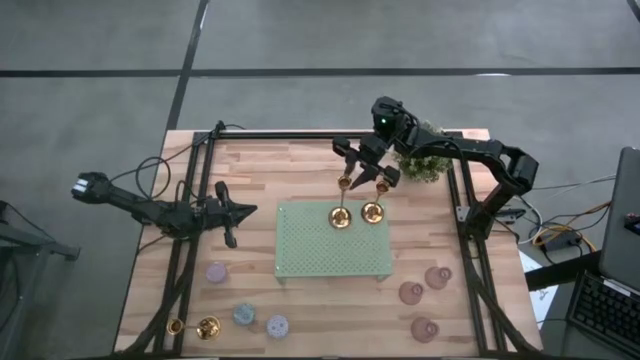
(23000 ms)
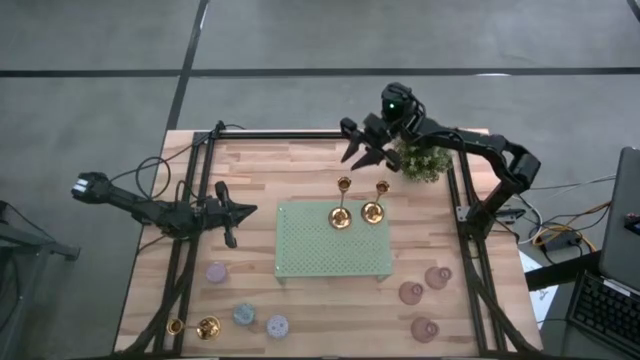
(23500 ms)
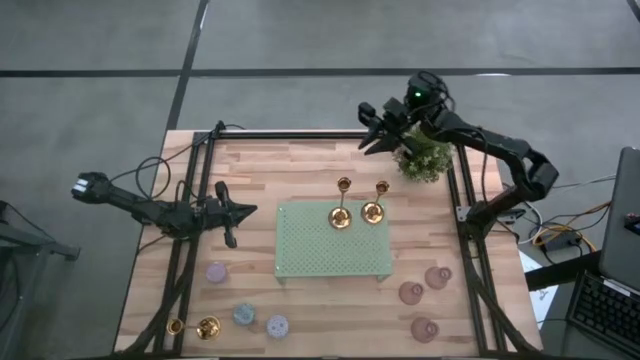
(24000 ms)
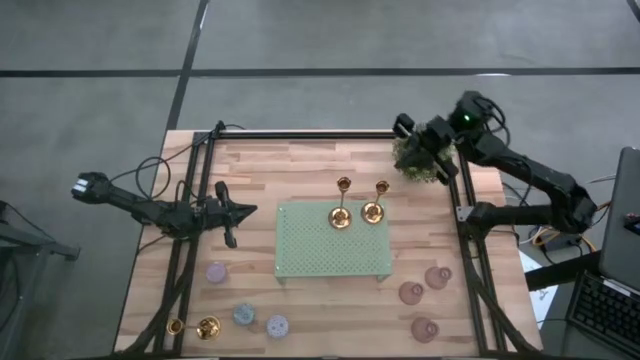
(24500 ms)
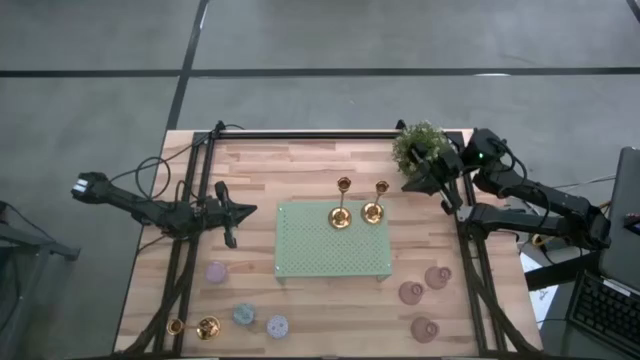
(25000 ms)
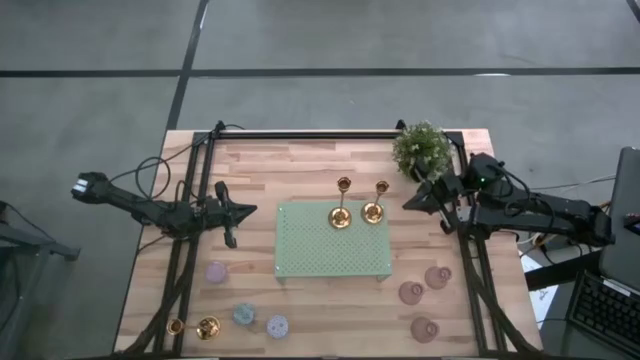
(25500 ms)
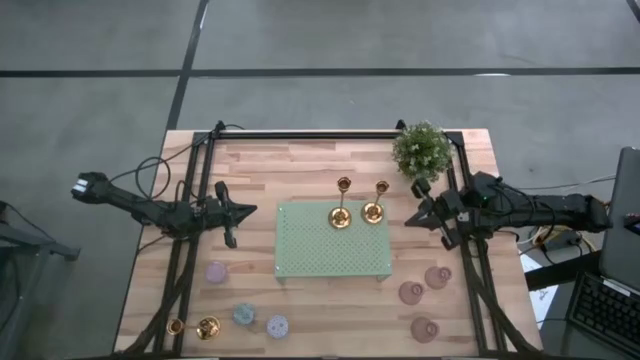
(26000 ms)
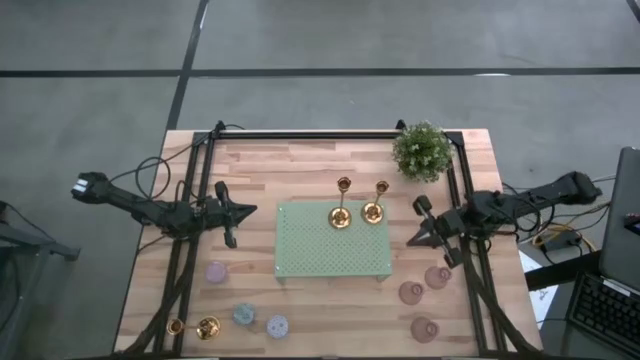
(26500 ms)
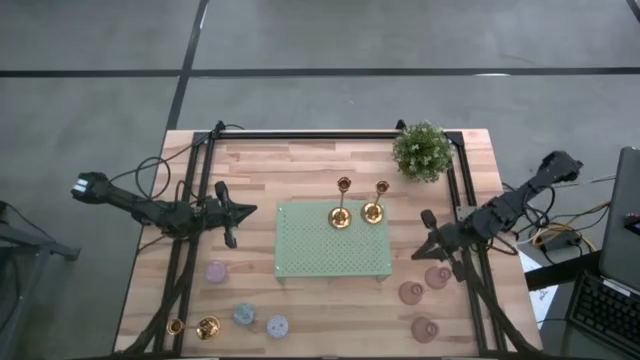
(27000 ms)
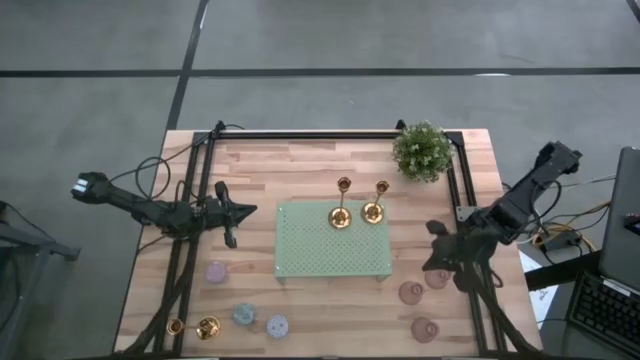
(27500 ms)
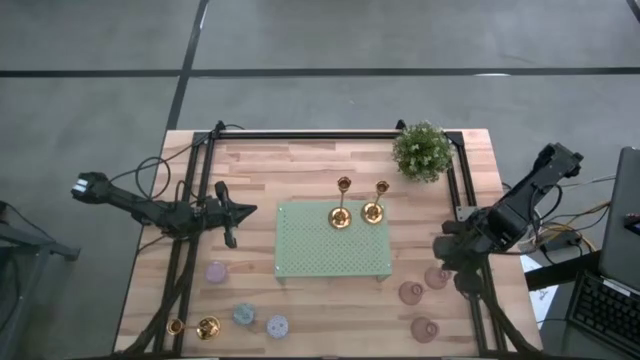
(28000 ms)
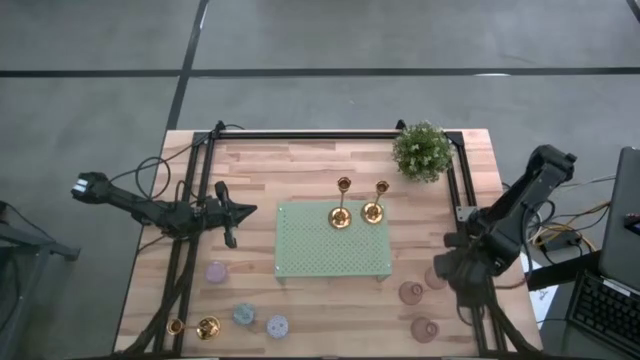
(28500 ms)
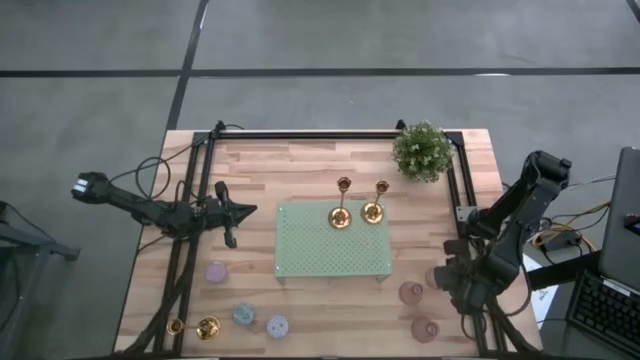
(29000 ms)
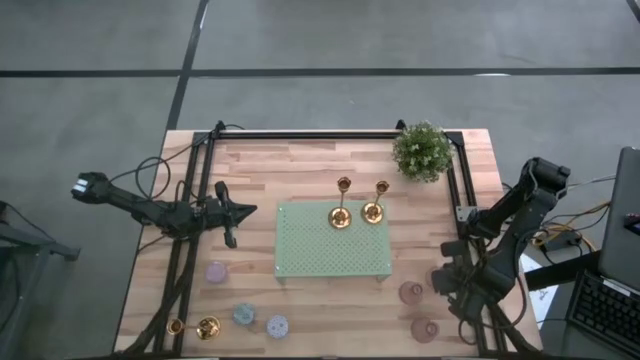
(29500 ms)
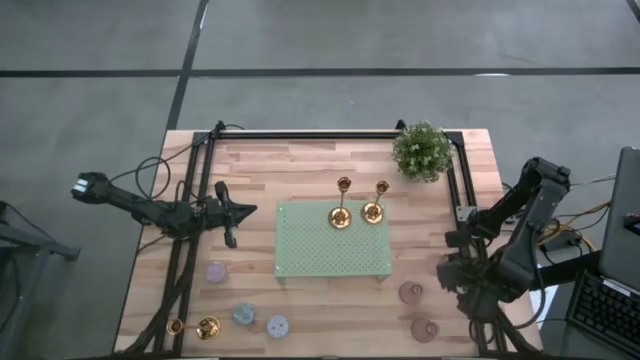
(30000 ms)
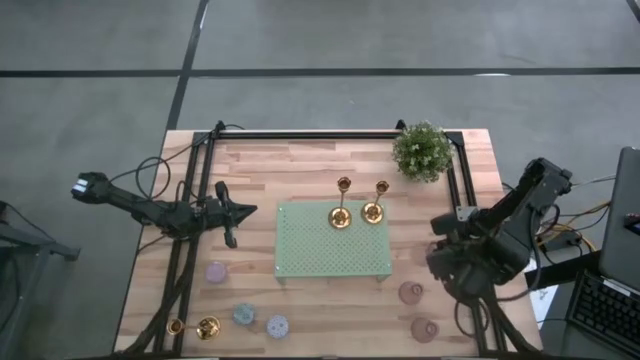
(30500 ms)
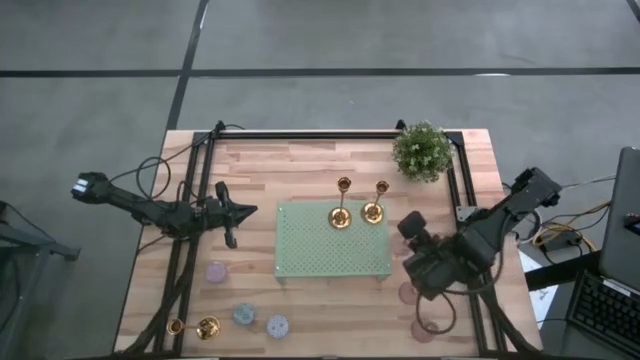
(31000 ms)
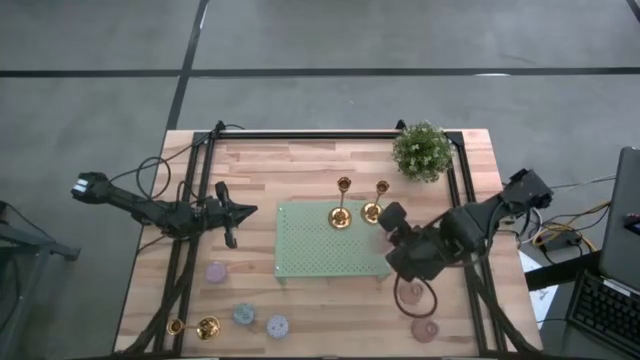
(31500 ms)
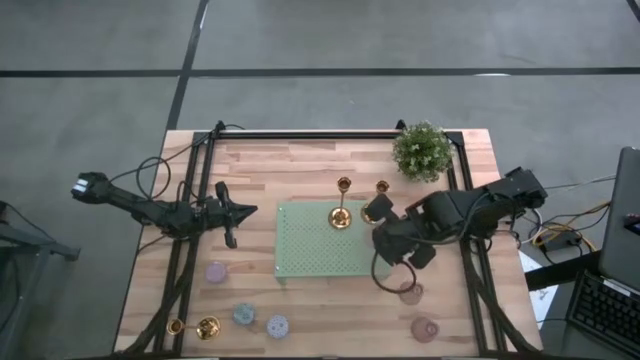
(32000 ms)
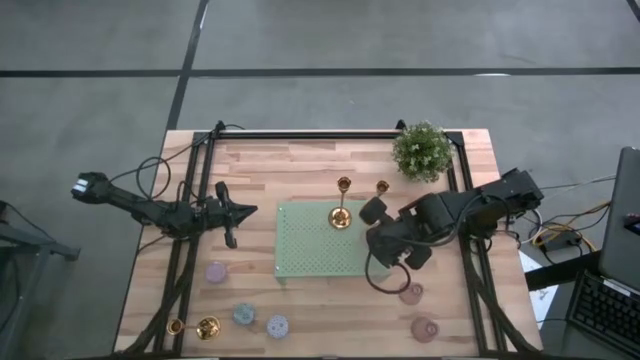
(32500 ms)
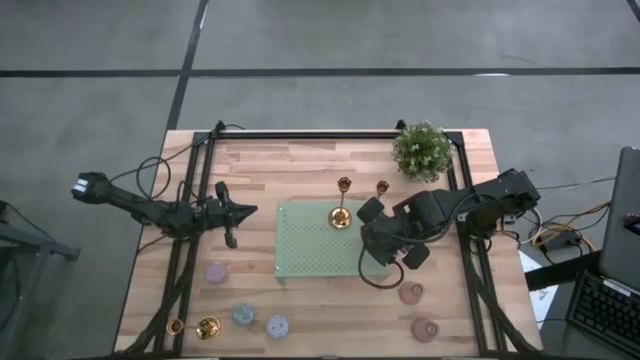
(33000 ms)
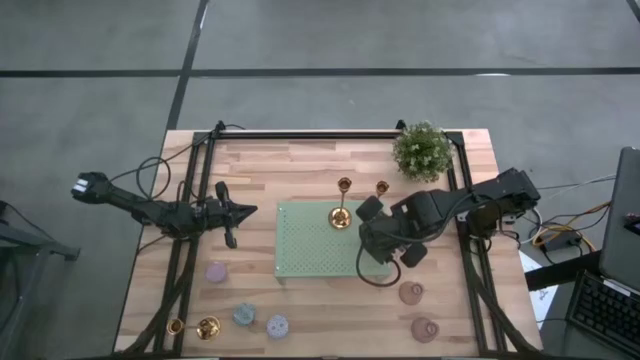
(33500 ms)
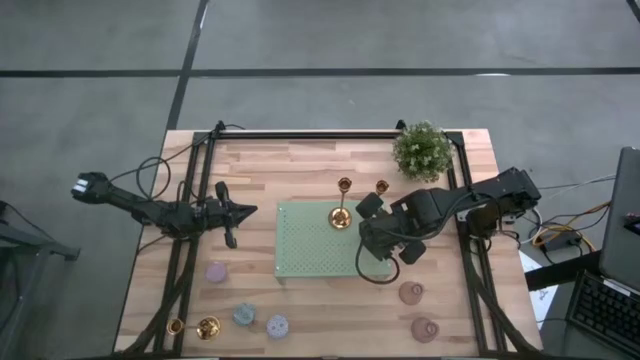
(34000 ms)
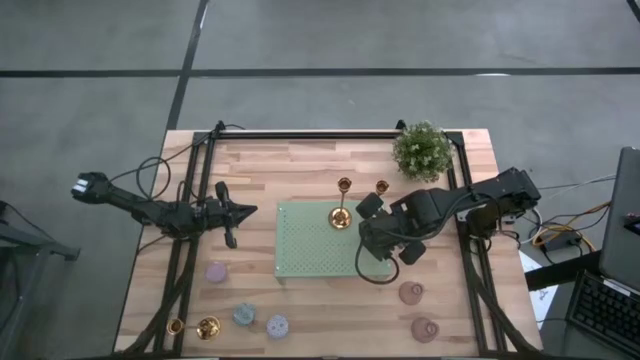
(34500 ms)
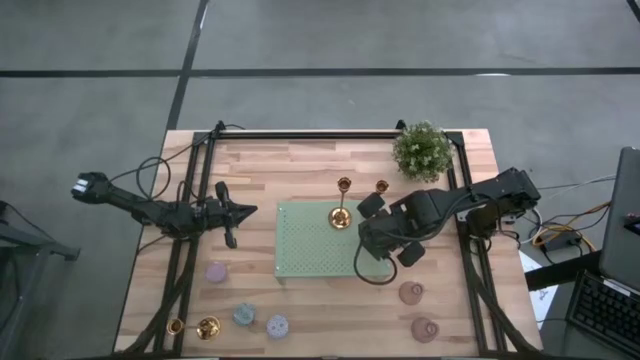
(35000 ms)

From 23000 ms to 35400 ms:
Task: Pick & Place candle stick holders
Put the top right pink glass candle holder on the shelf

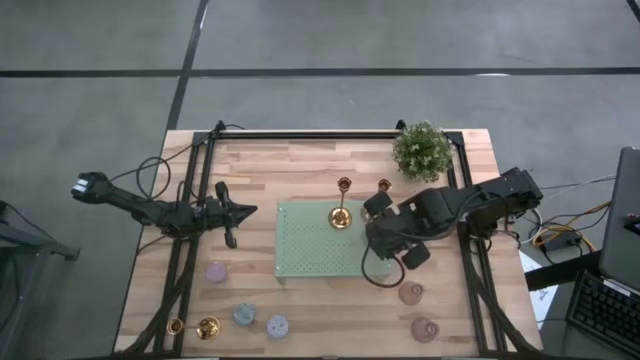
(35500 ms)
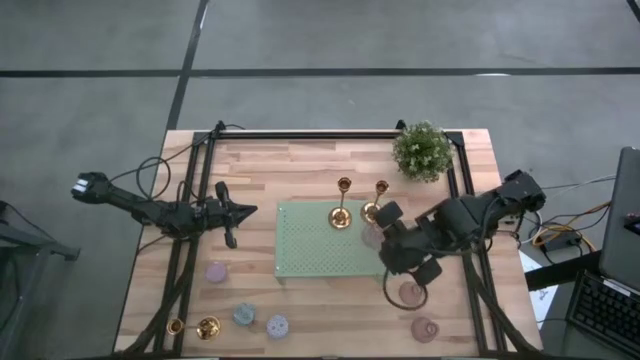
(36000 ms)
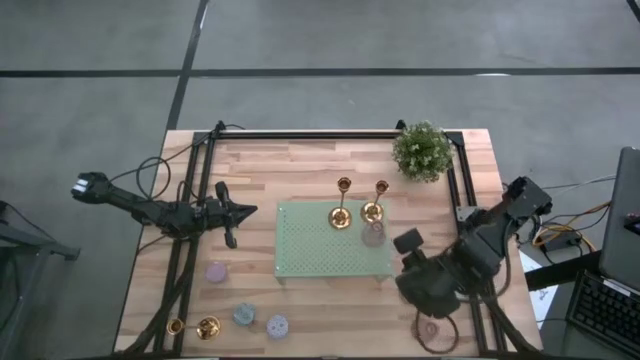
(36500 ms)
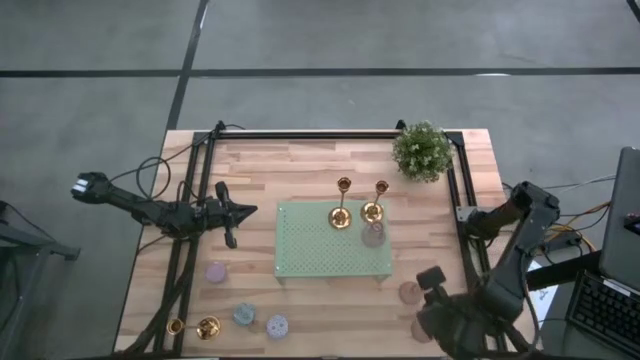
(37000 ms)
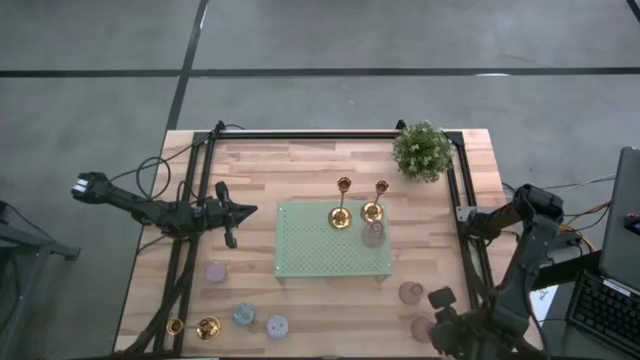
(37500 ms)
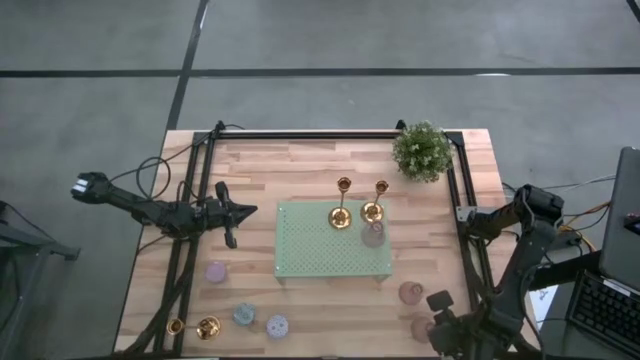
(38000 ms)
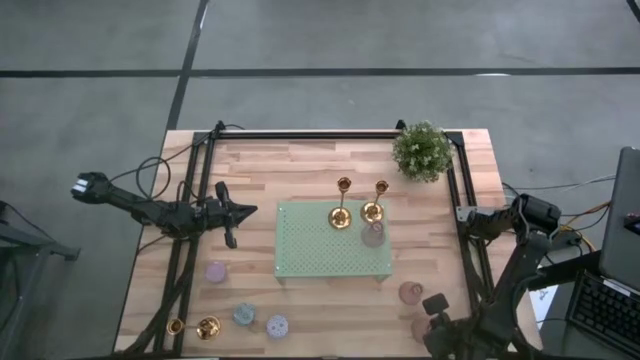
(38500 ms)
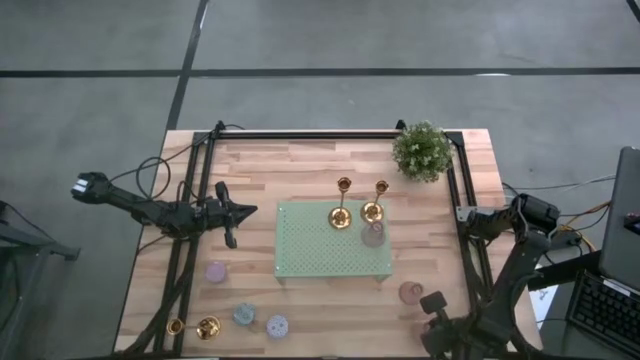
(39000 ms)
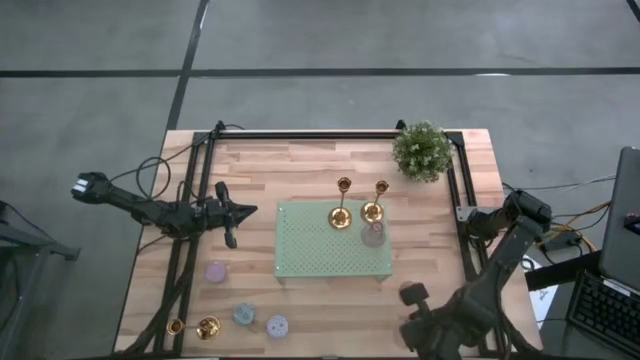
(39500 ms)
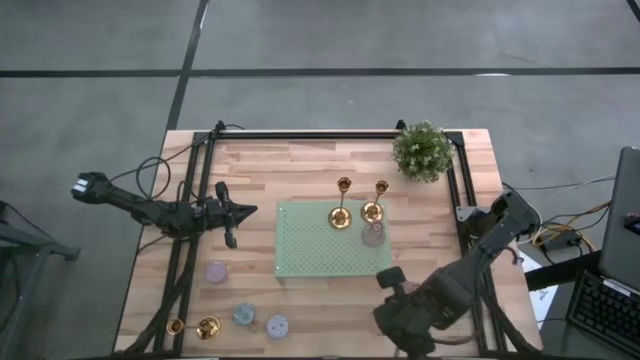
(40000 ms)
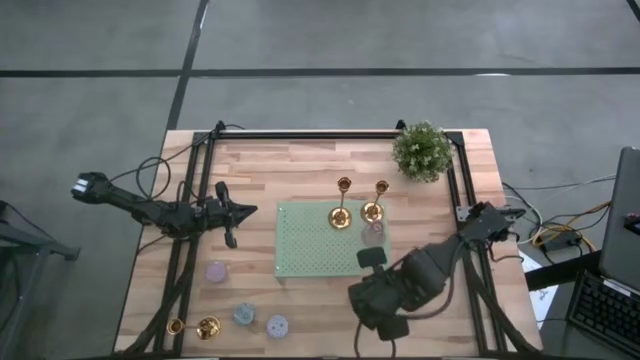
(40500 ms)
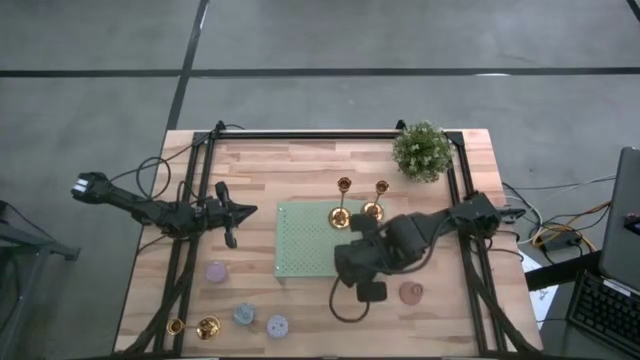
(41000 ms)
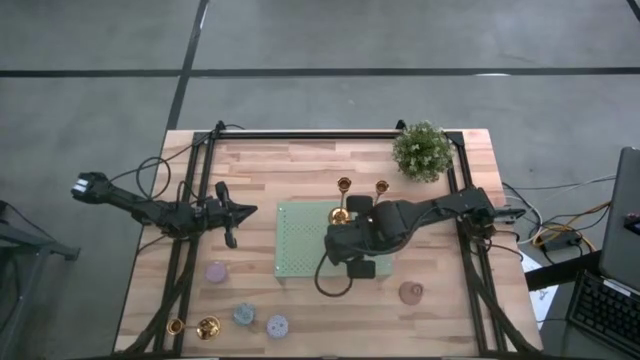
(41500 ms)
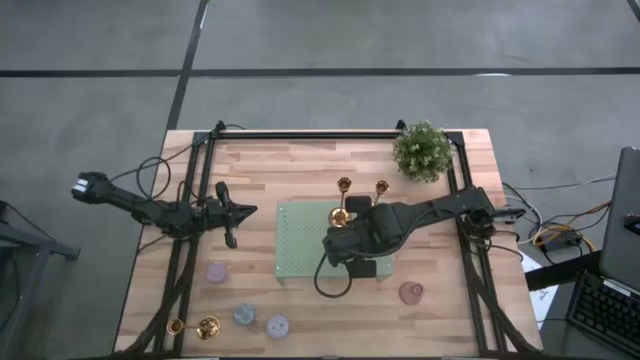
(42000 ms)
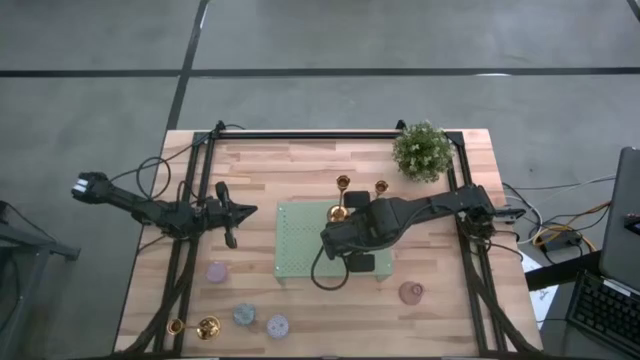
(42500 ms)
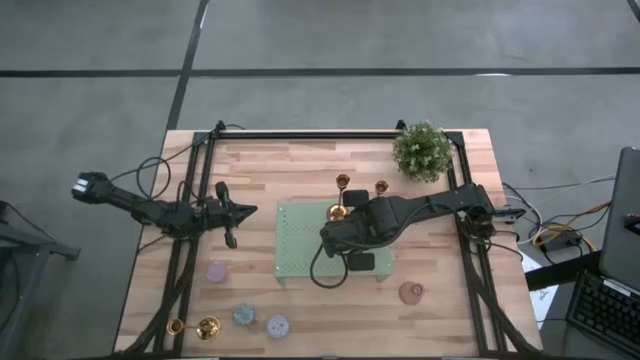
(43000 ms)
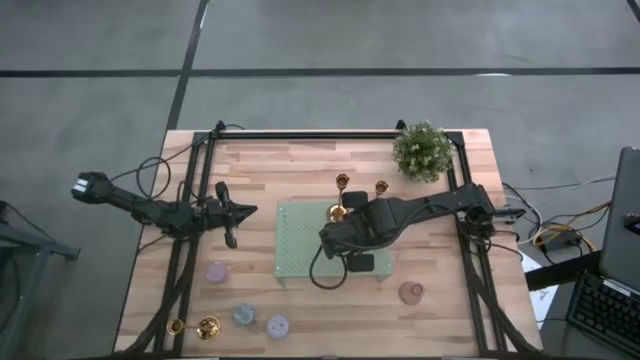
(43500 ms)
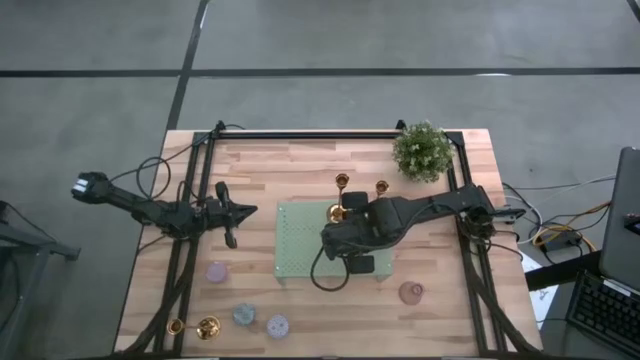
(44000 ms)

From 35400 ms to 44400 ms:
Put the bottom pink glass candle holder on the shelf
